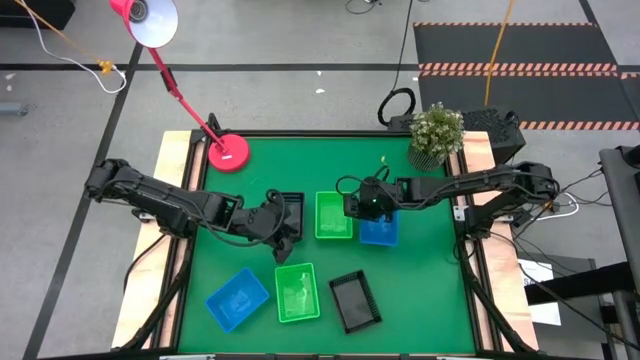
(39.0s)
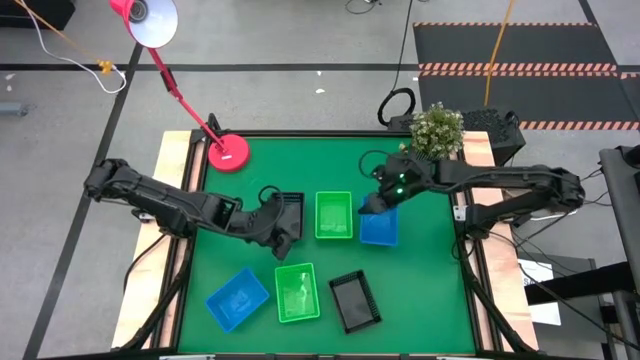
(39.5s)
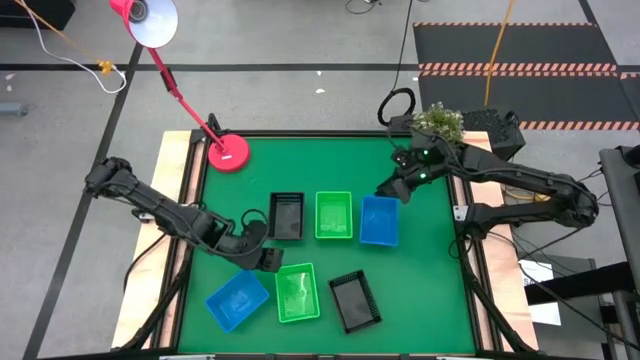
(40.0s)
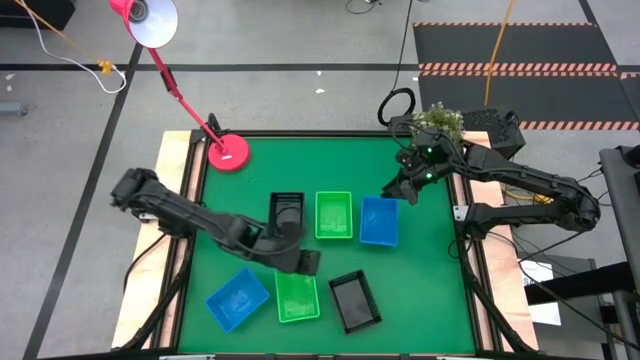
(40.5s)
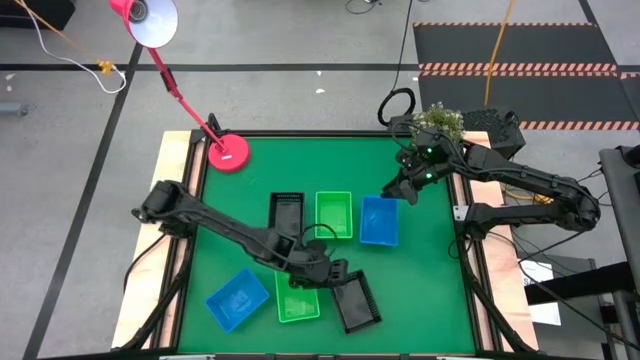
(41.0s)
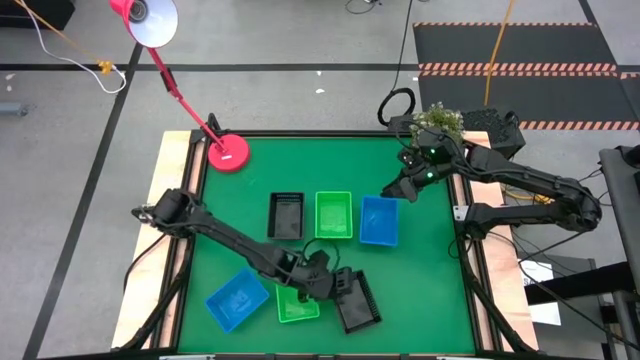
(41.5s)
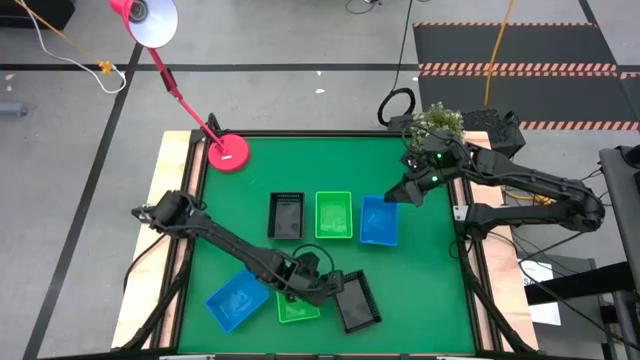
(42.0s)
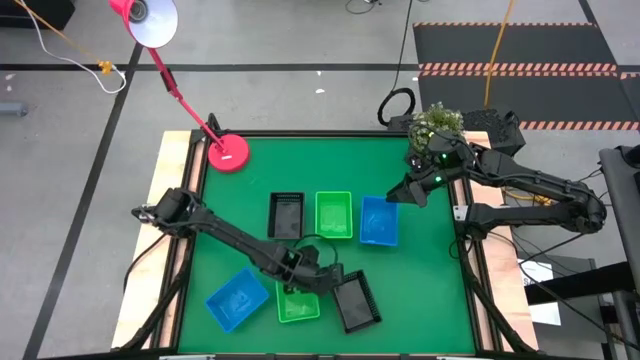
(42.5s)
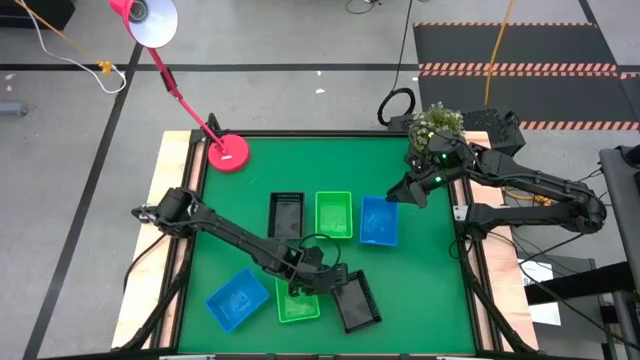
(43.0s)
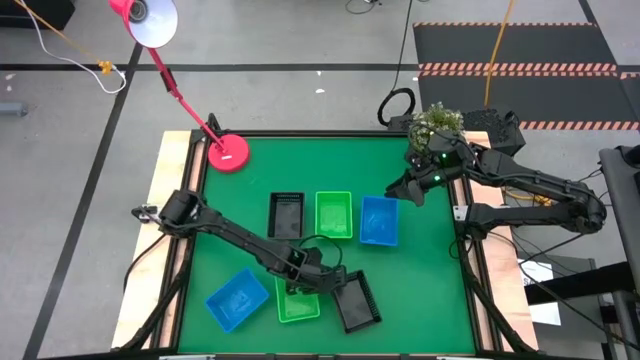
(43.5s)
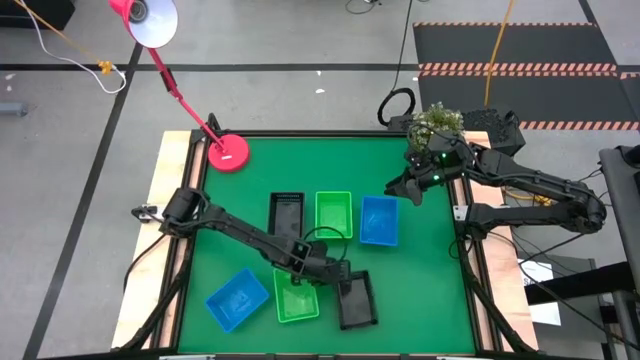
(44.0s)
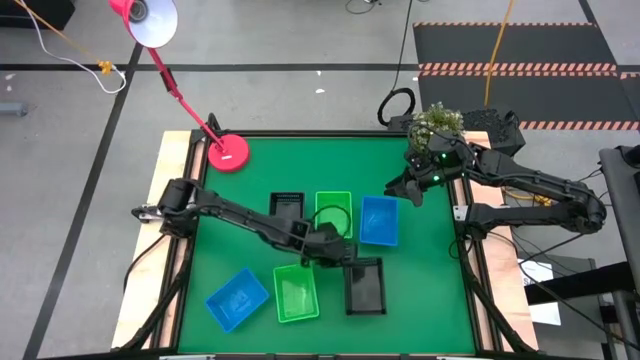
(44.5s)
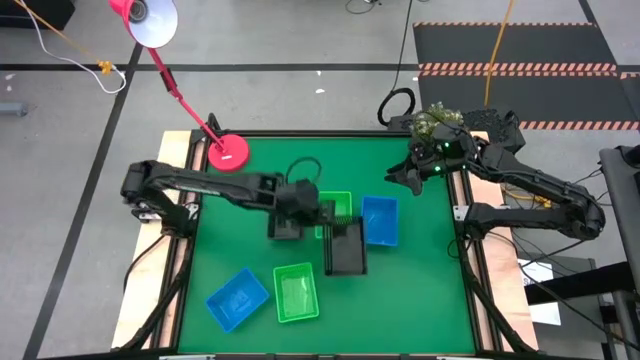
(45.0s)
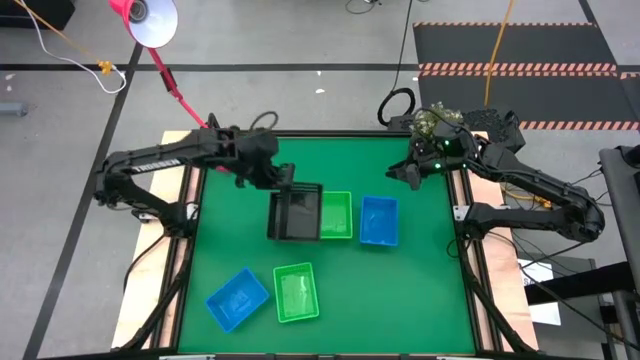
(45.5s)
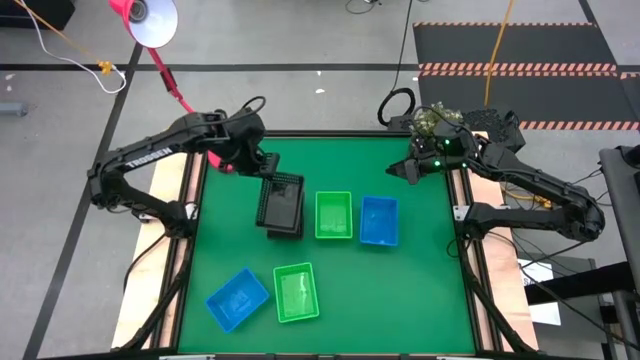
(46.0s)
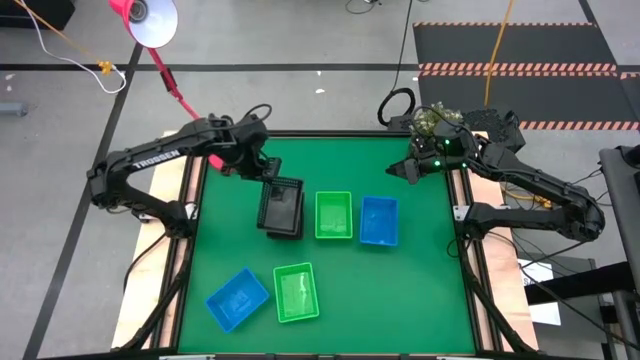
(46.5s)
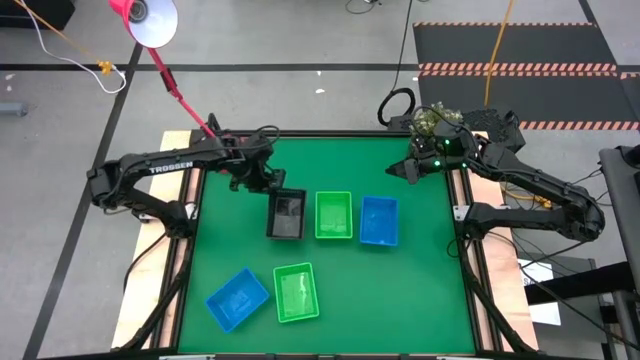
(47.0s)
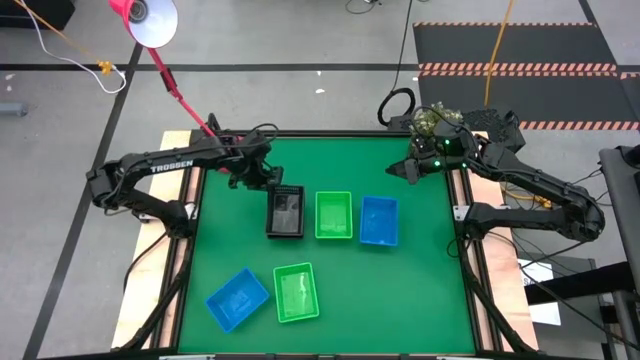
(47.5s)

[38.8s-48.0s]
Stack the bottom black bin on the top black bins

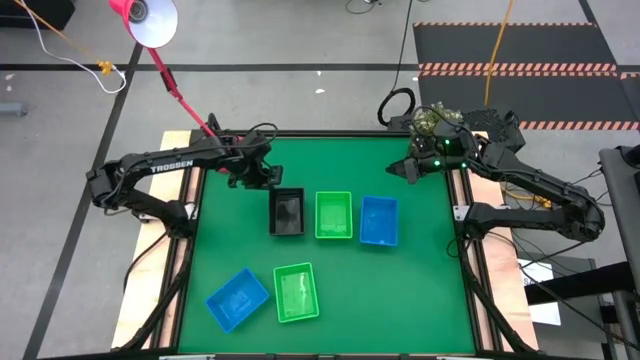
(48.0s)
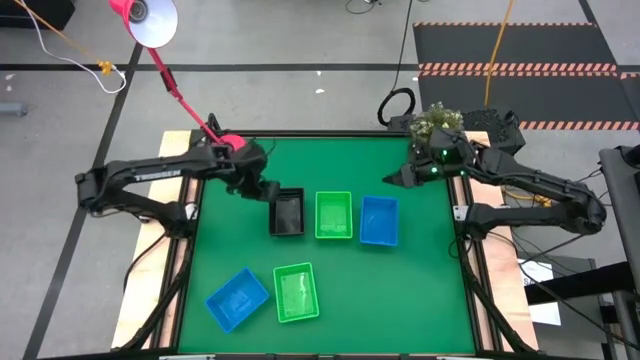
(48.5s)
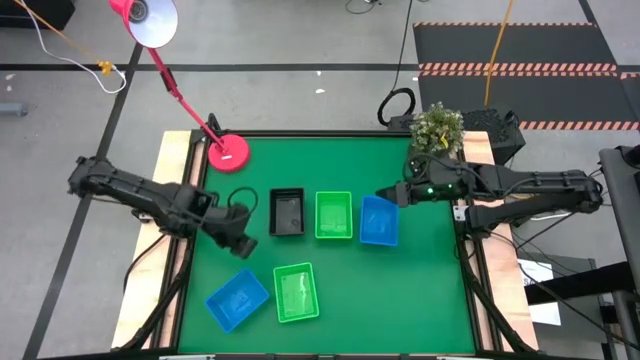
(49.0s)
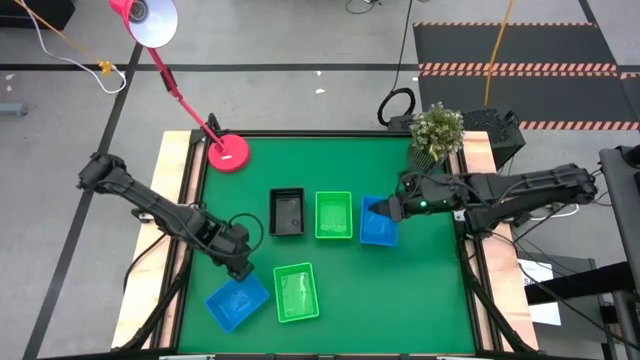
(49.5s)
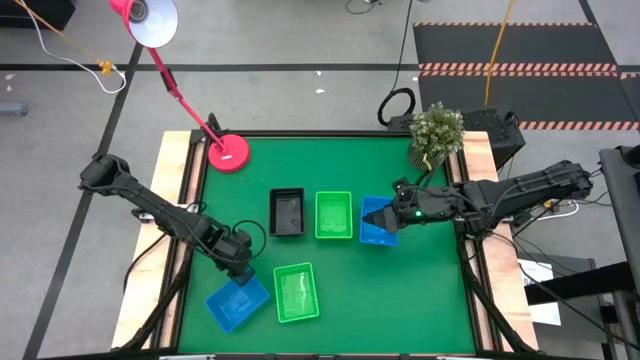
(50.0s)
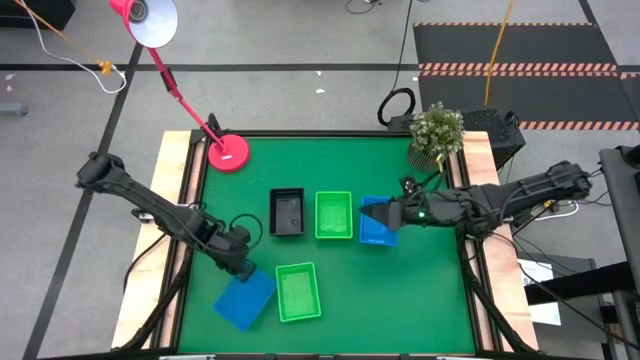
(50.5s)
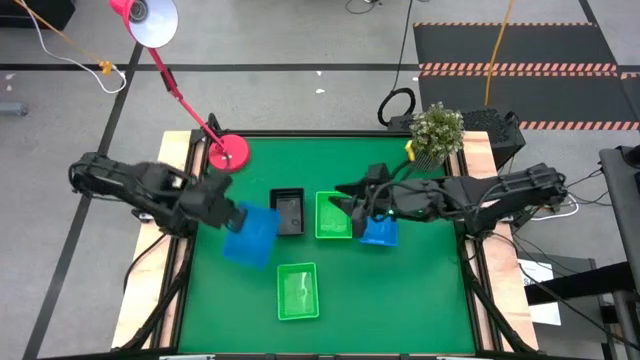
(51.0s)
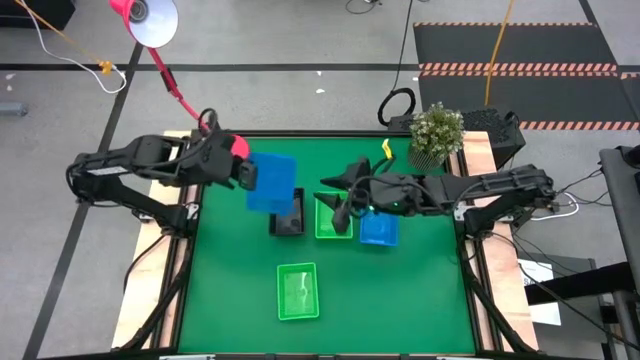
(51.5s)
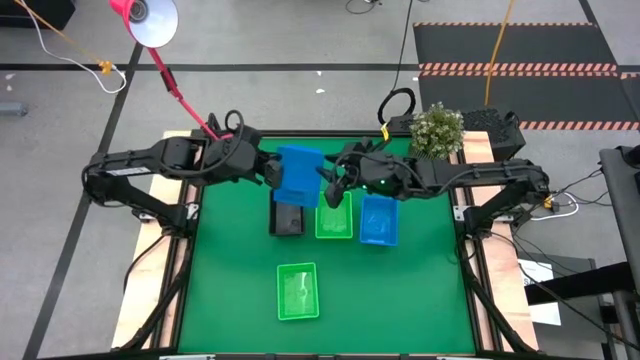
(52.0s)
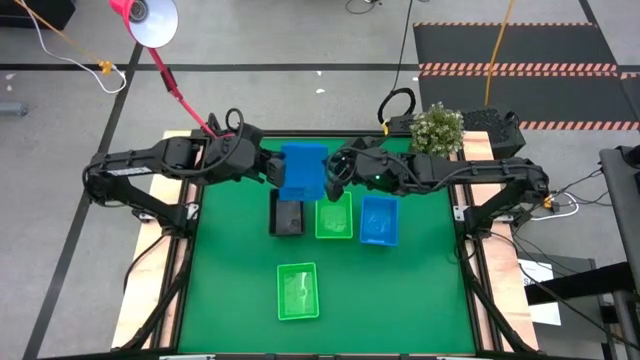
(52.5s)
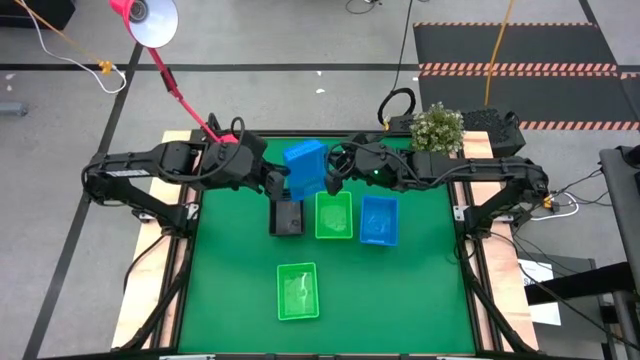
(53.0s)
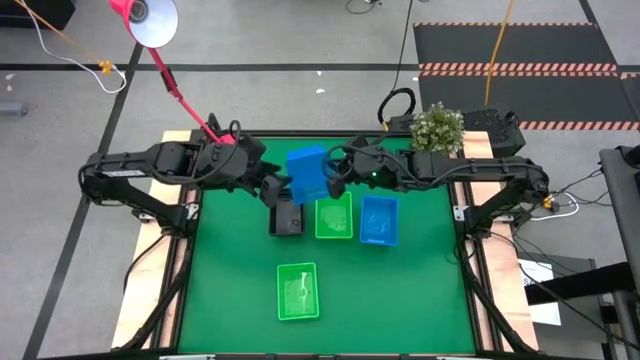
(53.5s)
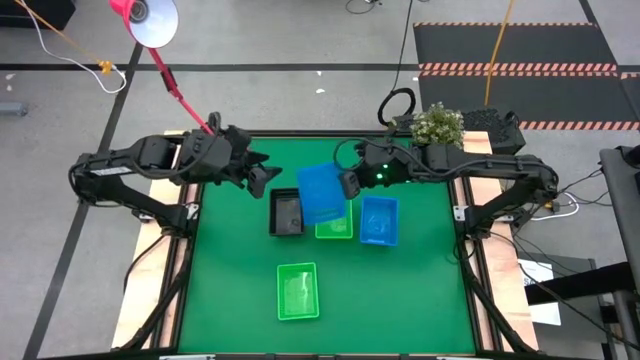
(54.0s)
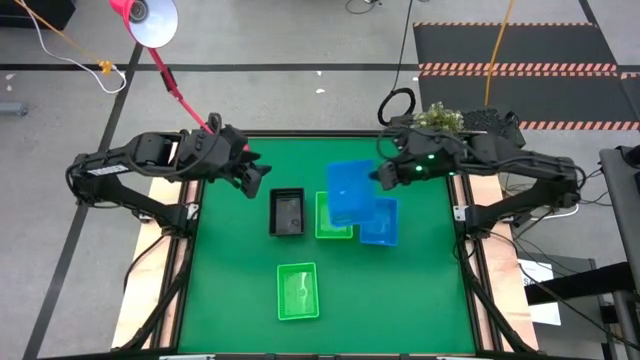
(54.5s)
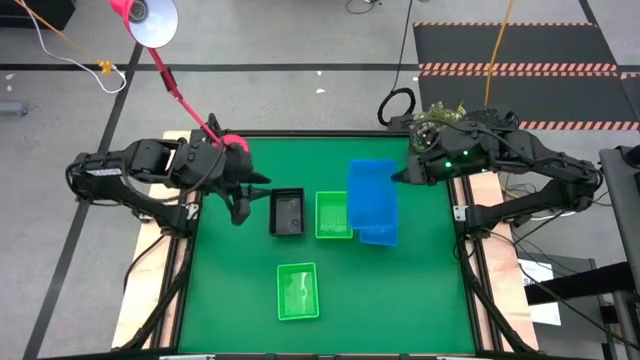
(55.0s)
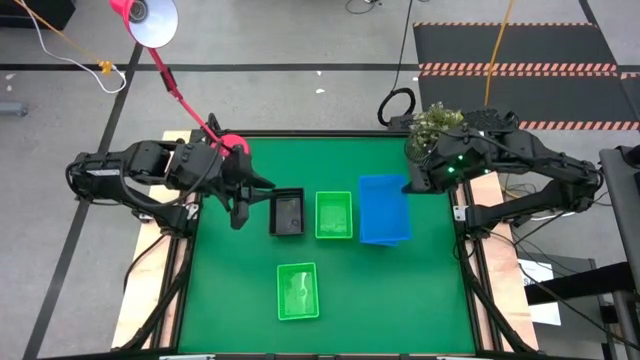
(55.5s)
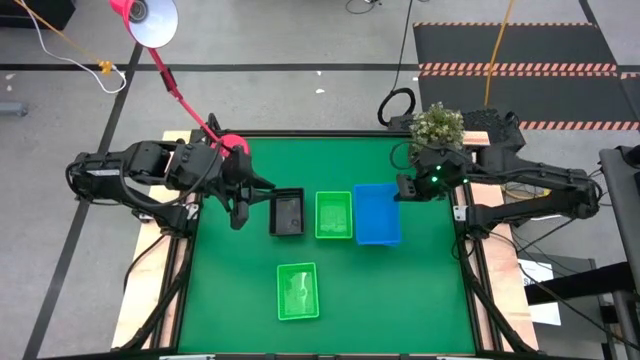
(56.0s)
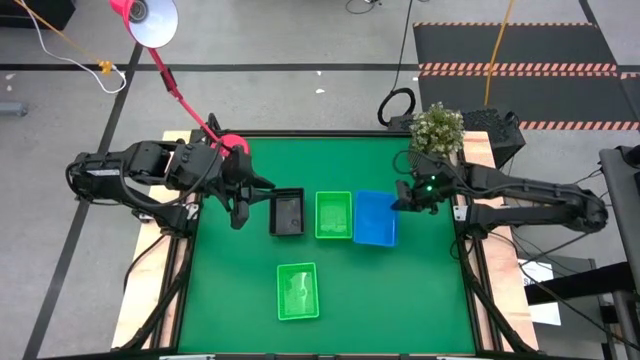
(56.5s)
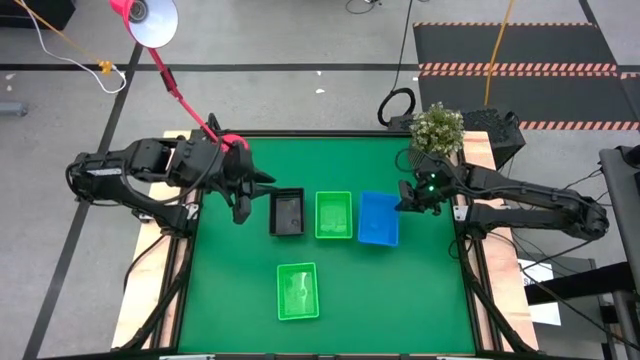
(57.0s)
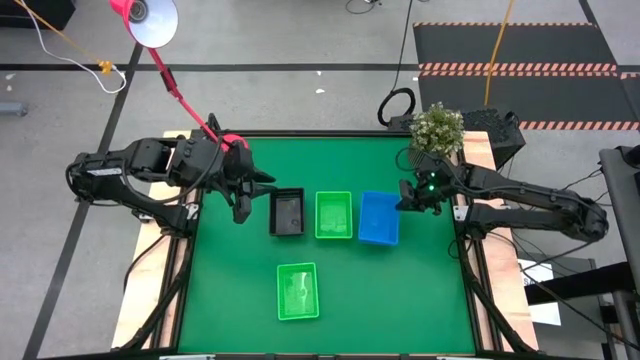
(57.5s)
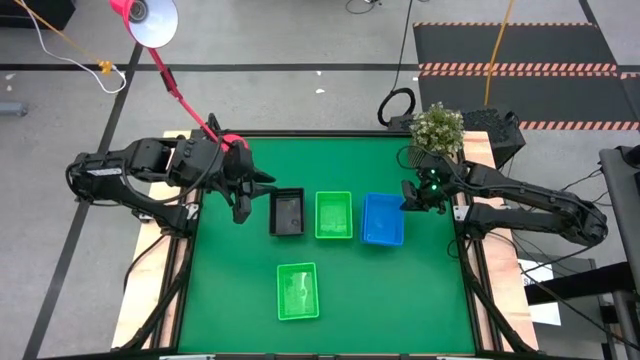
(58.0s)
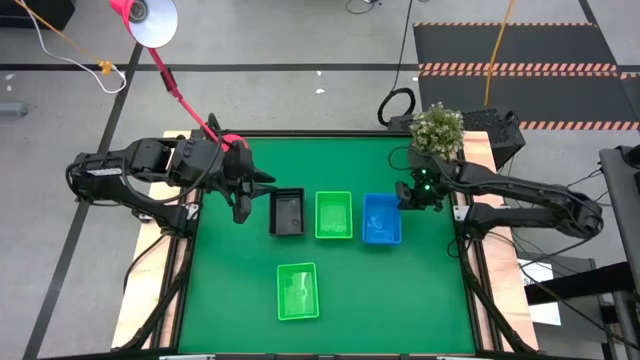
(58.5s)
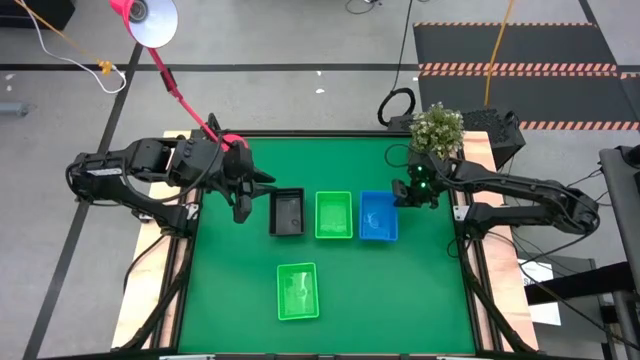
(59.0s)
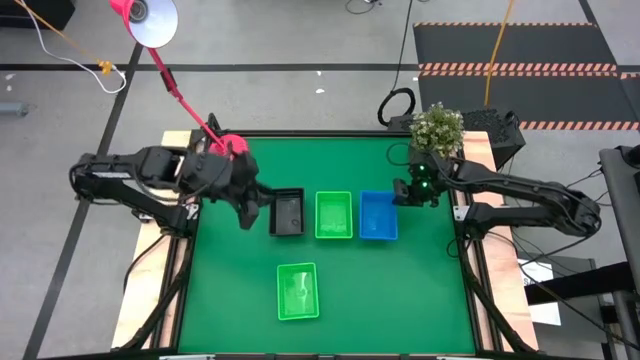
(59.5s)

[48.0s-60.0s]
Stack the bottom blue bin on the top blue bins
